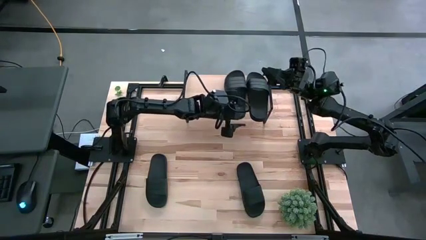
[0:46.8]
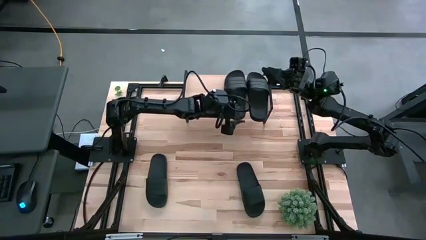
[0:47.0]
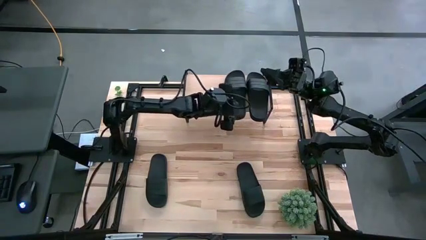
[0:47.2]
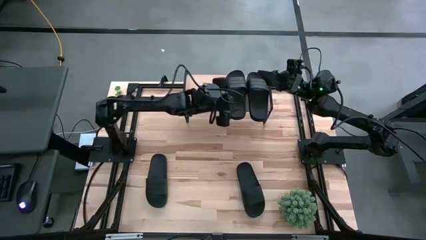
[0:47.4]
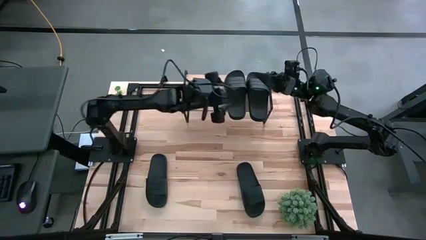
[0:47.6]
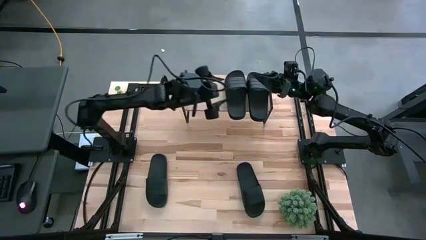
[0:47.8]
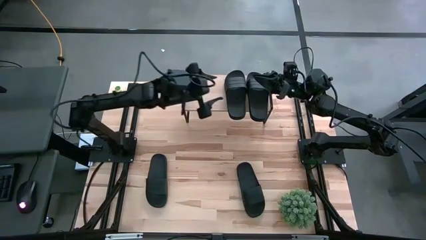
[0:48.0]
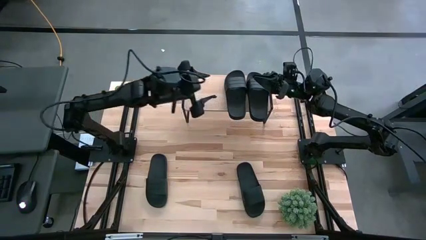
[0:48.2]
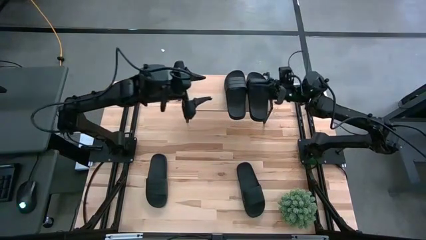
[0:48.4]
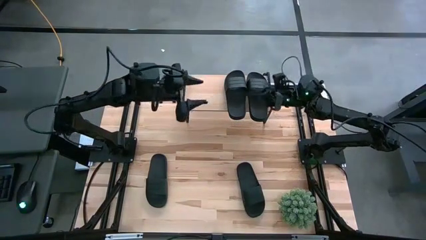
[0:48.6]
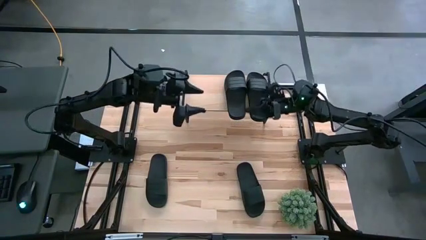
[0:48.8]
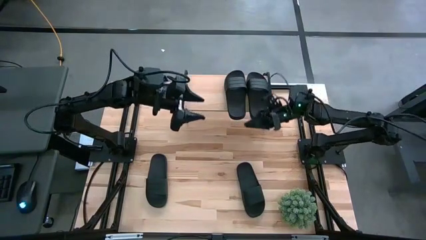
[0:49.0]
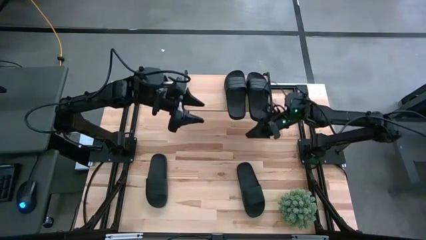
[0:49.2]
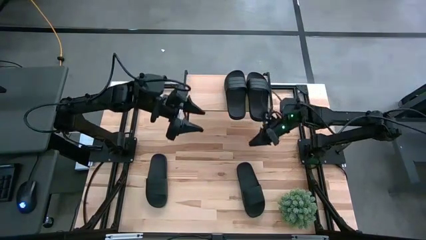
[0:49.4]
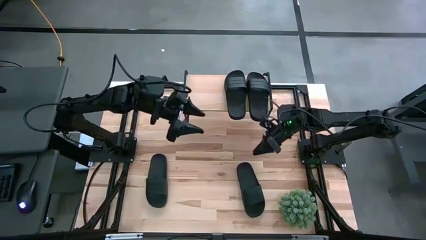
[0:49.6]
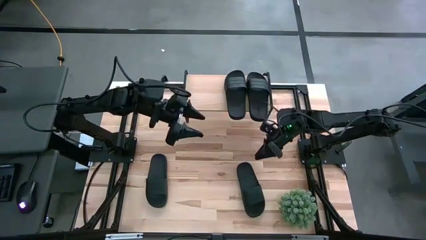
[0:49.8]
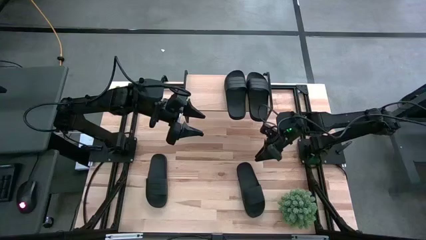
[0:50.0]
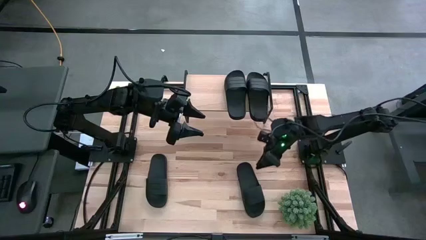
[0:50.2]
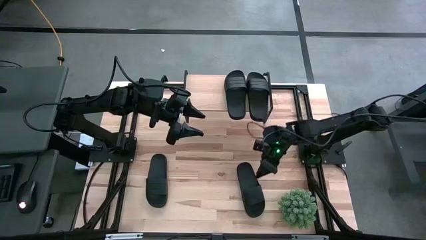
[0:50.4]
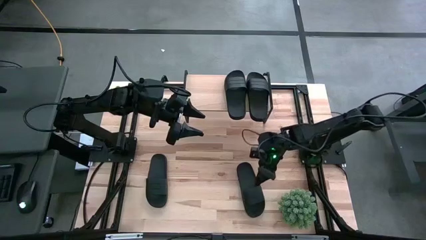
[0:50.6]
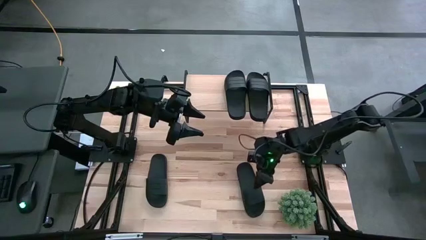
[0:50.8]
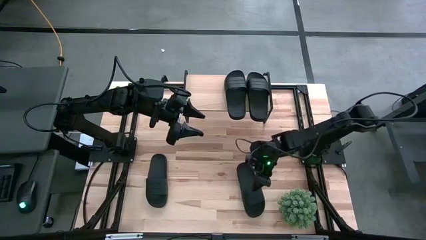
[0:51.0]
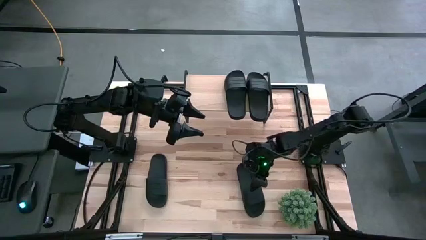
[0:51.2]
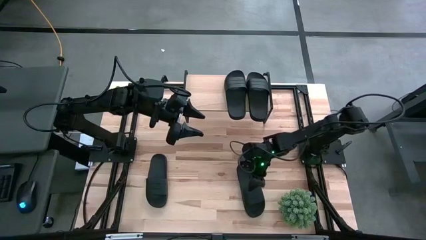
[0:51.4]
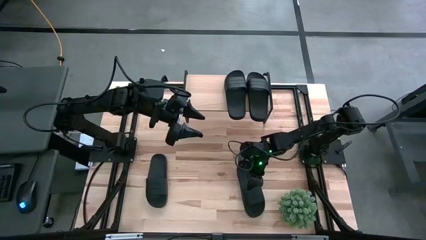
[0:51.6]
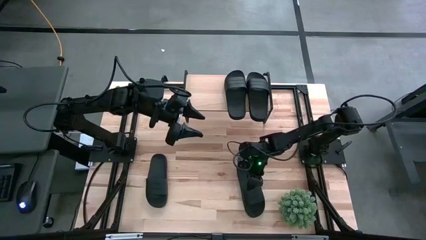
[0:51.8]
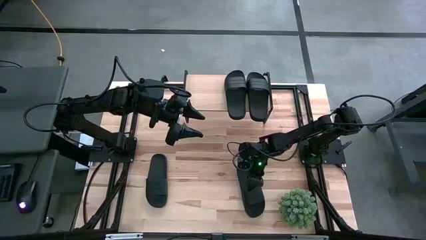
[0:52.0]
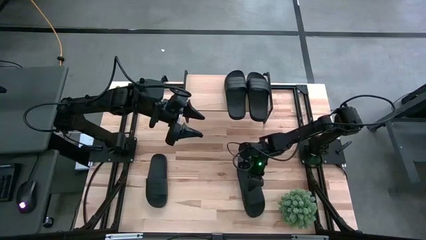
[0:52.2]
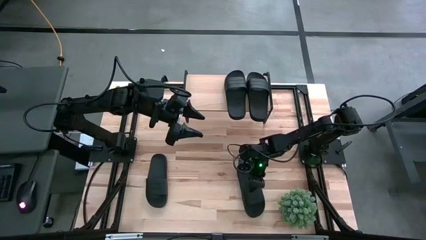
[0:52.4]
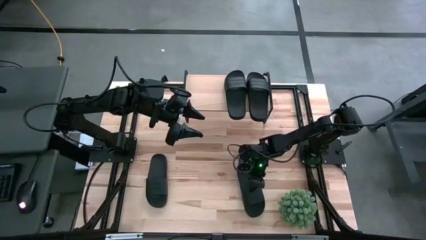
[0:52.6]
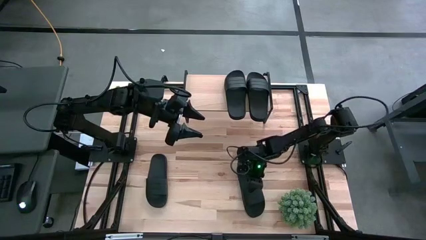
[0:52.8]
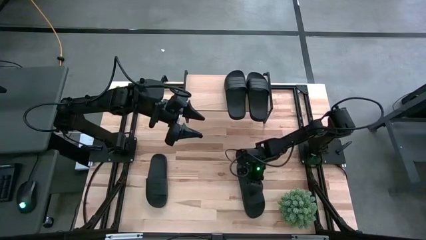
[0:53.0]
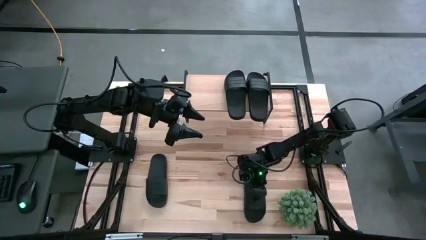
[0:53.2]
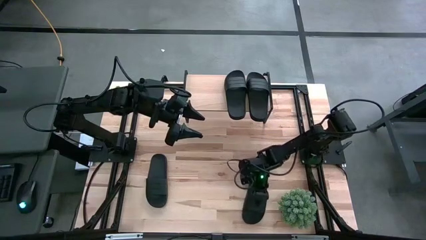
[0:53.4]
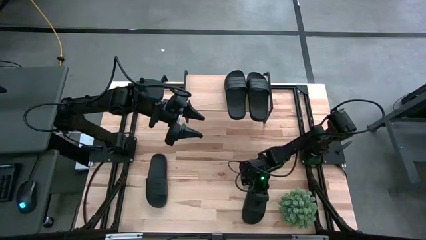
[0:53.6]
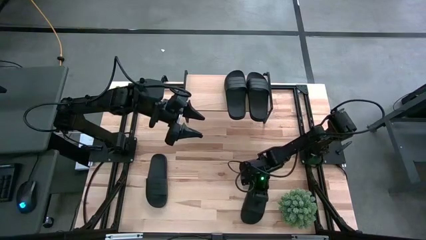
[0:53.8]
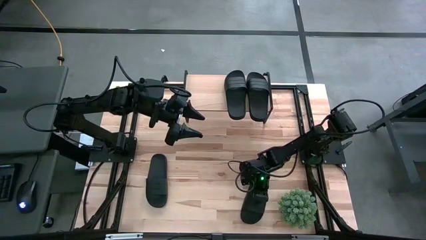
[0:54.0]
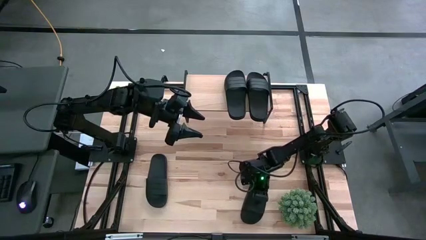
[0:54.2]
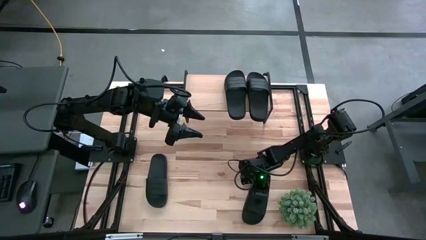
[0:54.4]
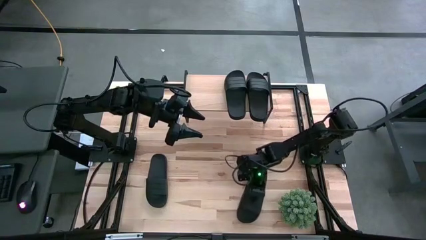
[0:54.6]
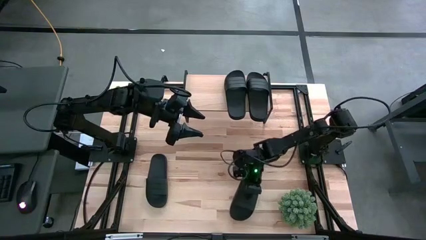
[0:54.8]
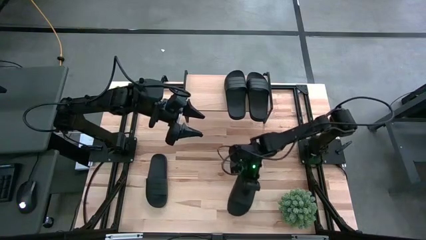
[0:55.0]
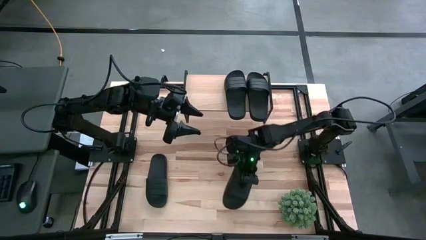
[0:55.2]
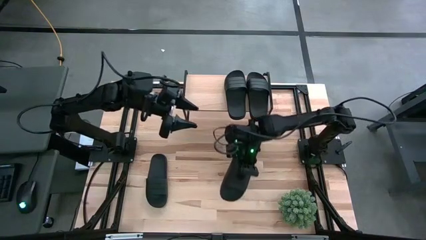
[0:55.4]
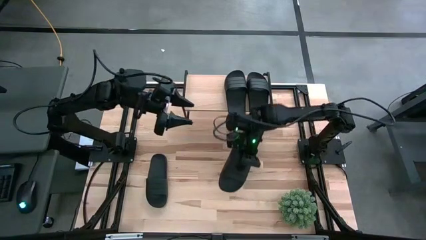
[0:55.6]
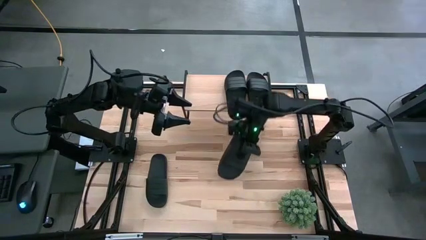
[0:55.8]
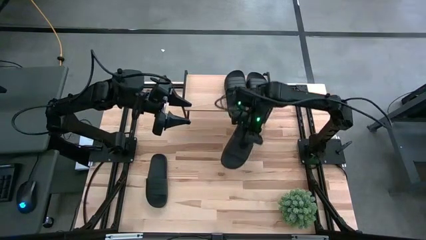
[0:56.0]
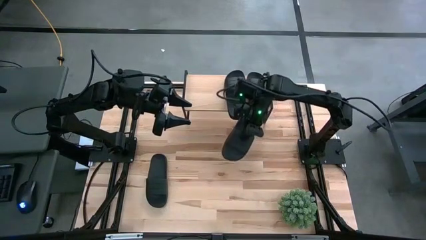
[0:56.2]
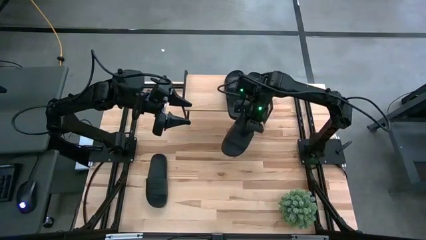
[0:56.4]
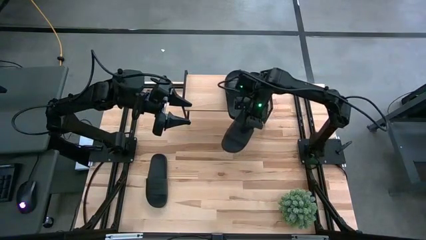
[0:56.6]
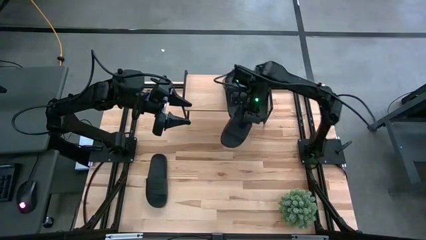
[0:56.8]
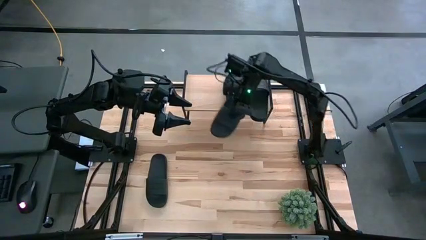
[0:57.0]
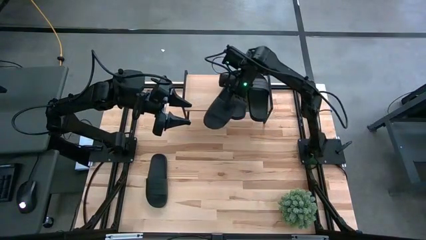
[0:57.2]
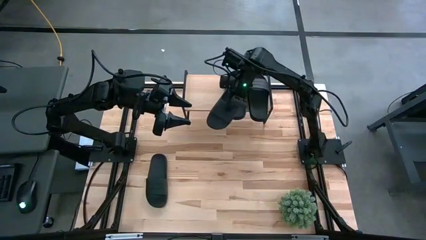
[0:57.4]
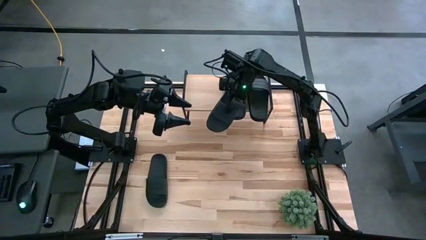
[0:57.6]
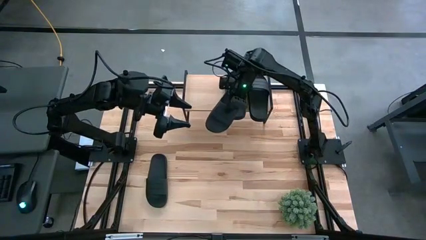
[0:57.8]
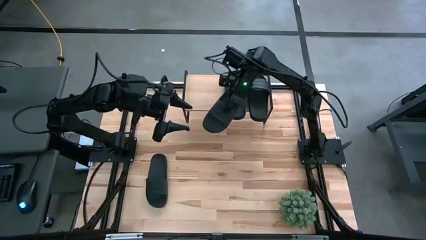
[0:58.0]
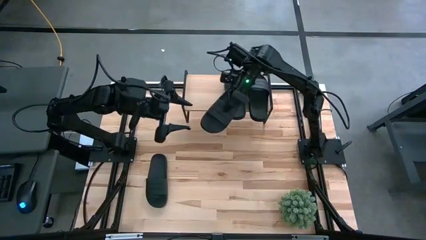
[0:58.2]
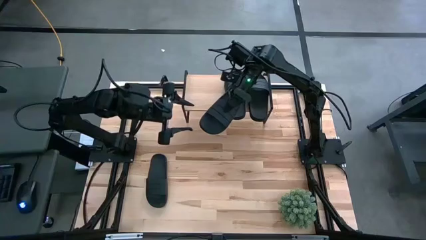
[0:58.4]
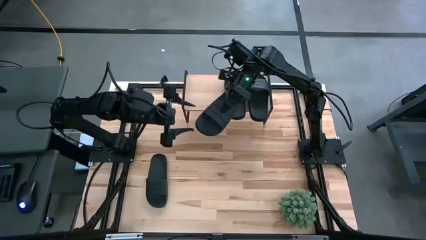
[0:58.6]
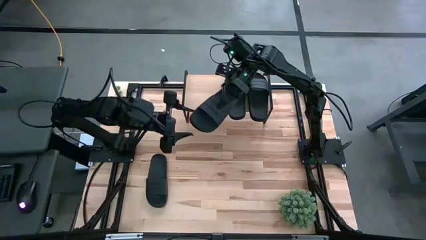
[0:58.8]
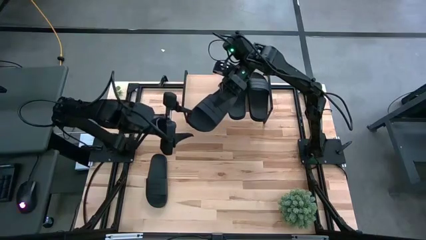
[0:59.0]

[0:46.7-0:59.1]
Task: Pick and place slides into the shelf
Put the black slide on the shelf

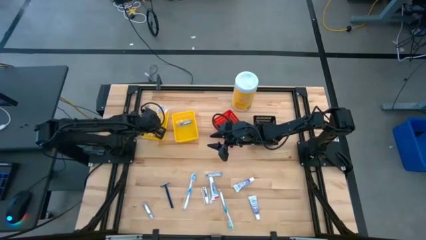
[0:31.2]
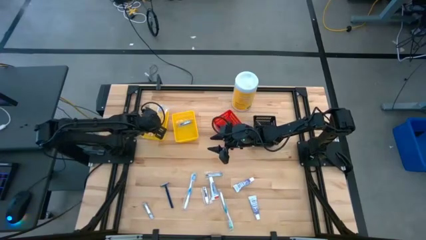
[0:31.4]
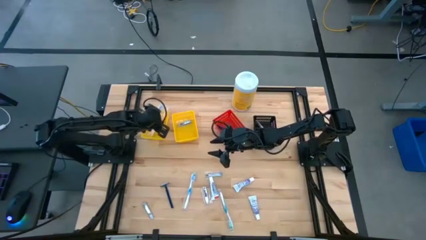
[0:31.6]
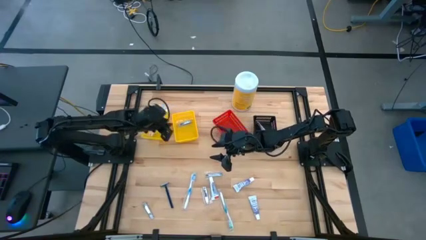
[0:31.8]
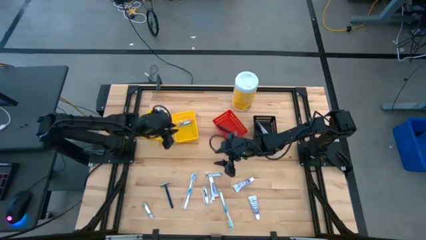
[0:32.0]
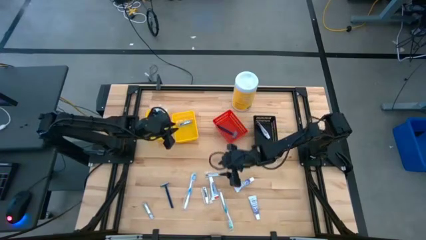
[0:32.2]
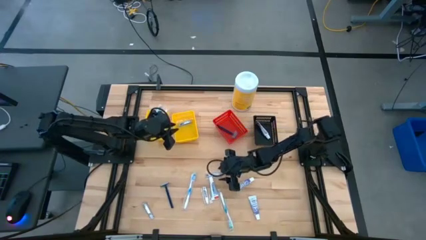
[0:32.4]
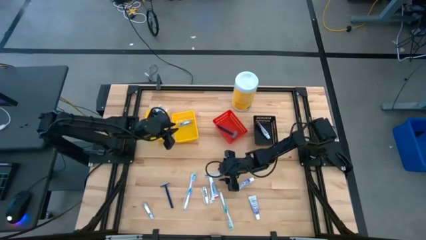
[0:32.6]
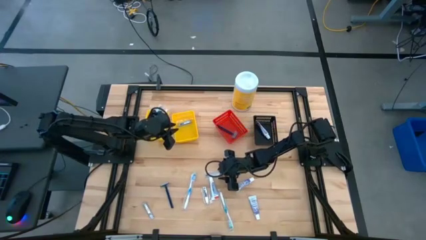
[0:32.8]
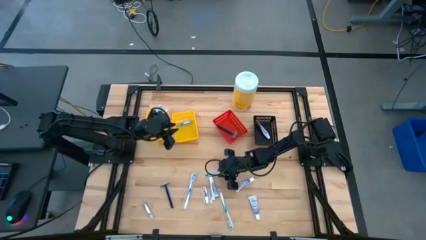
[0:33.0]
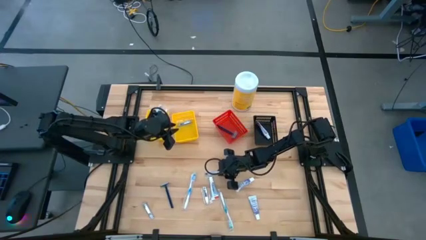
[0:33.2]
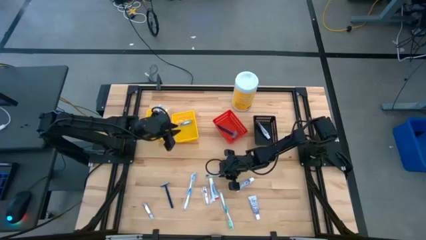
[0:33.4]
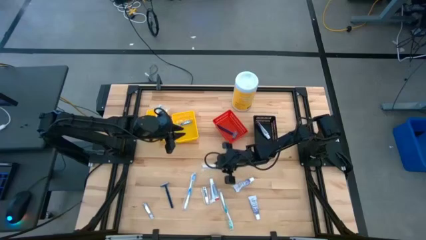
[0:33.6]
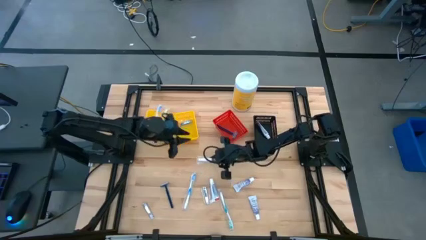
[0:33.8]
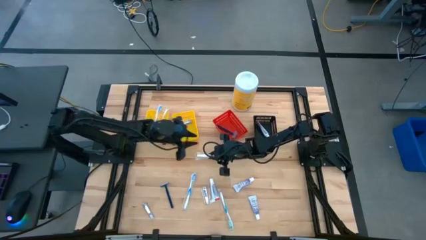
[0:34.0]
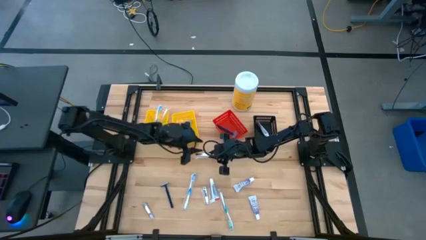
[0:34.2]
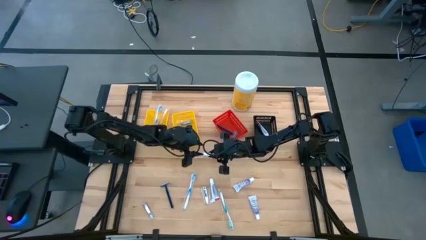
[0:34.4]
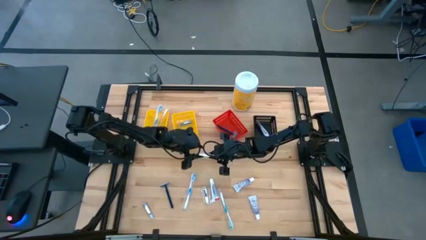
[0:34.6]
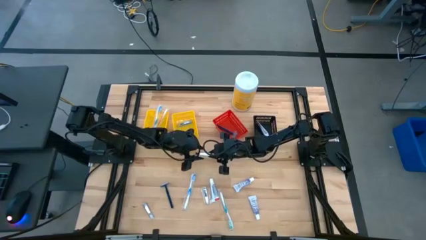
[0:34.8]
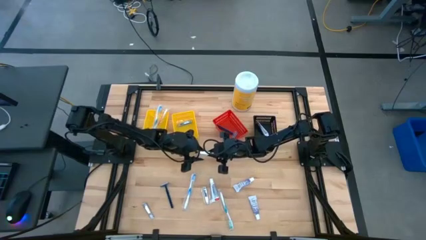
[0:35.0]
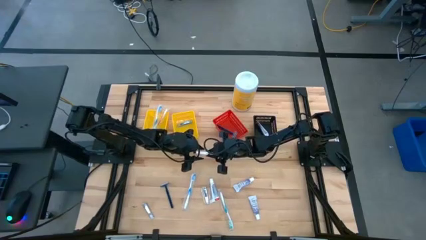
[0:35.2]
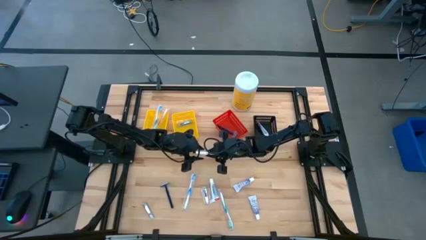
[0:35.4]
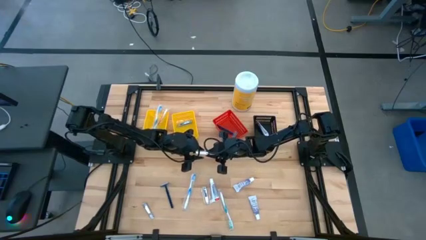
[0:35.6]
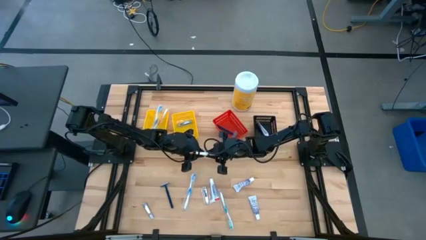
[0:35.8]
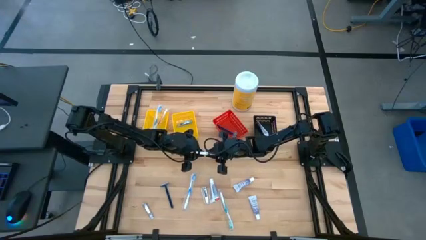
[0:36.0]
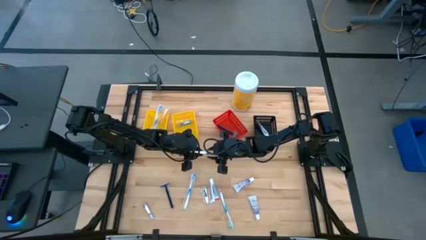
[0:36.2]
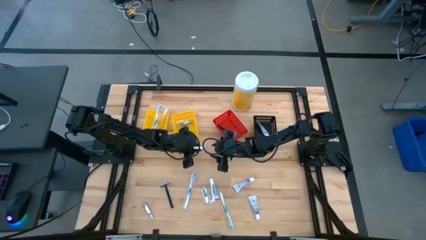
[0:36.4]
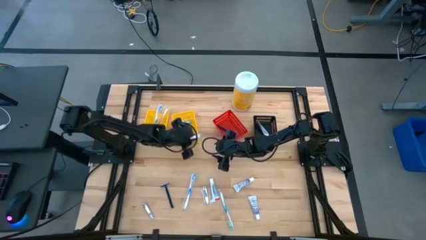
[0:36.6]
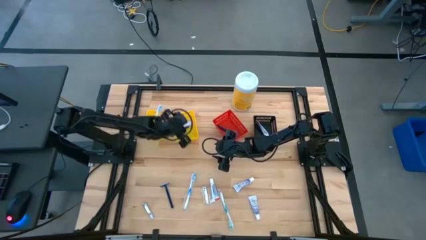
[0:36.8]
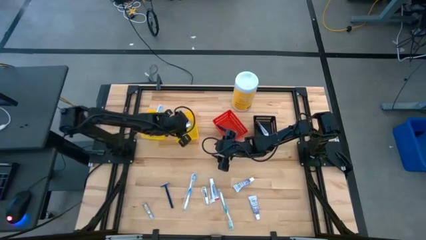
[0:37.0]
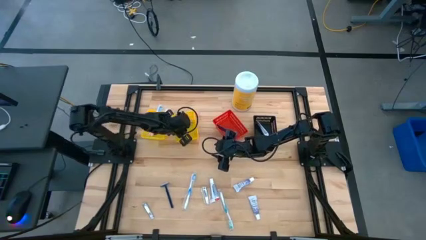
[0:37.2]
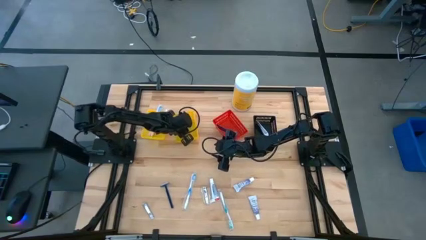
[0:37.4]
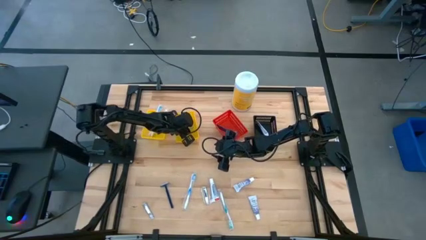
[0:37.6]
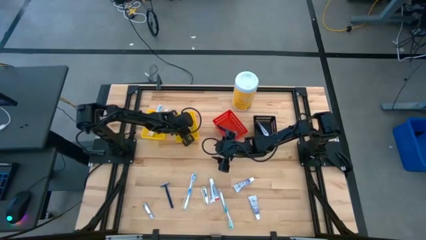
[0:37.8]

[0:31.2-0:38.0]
Task: Pick & Place Travel size toiletries
Put the silver nail cutter into the right yellow bin
